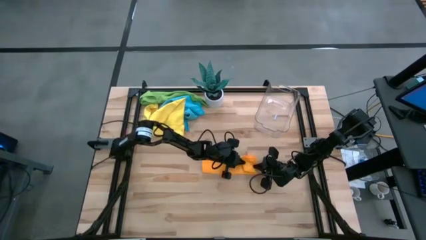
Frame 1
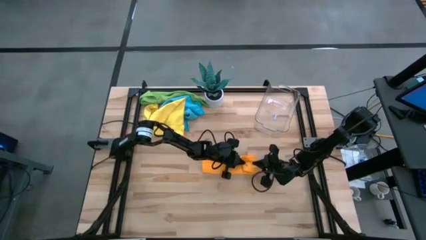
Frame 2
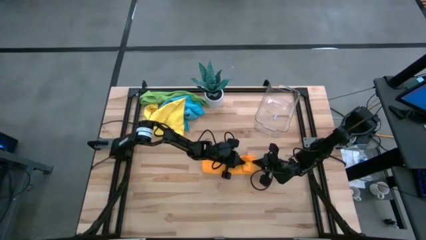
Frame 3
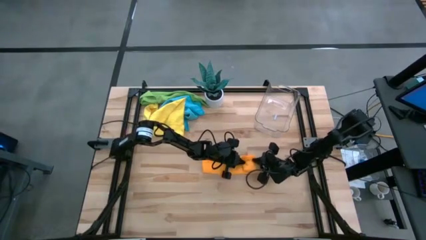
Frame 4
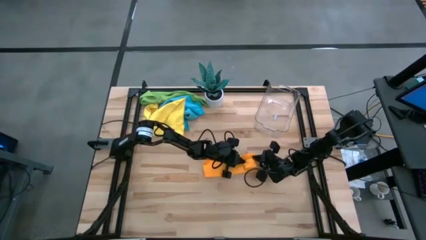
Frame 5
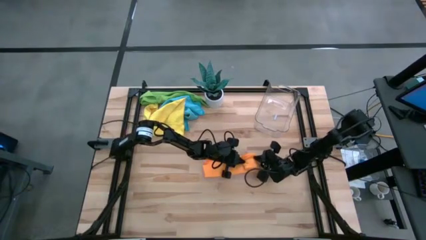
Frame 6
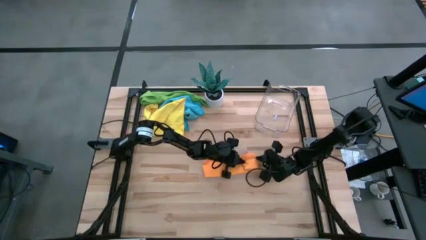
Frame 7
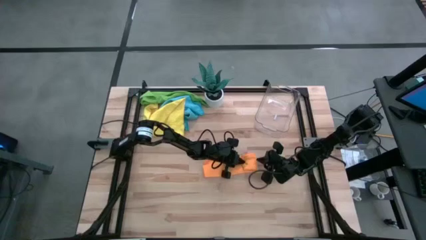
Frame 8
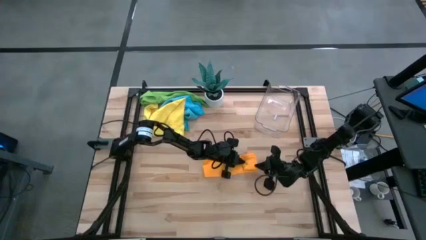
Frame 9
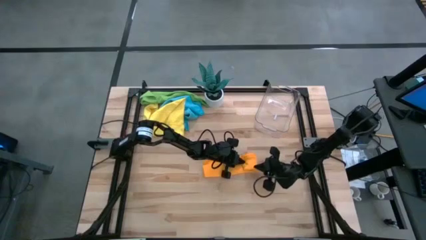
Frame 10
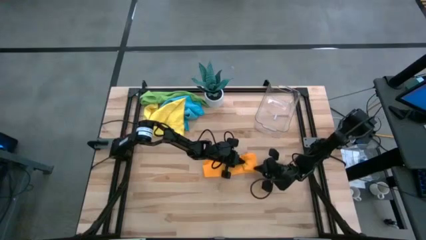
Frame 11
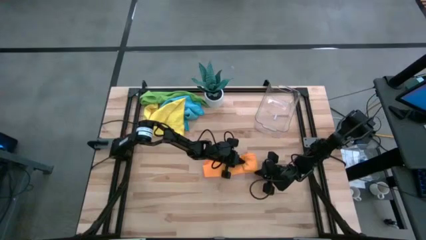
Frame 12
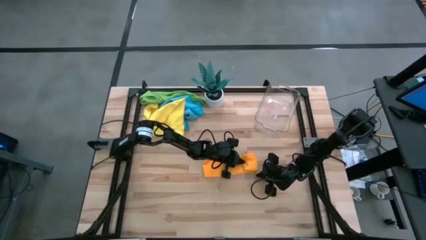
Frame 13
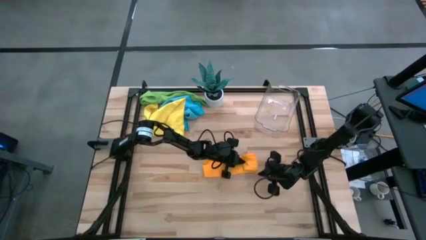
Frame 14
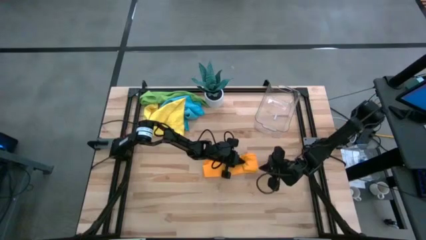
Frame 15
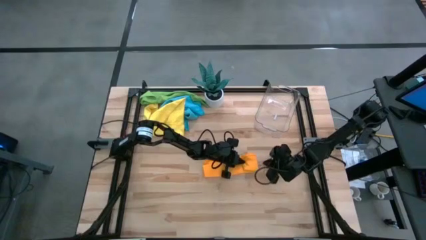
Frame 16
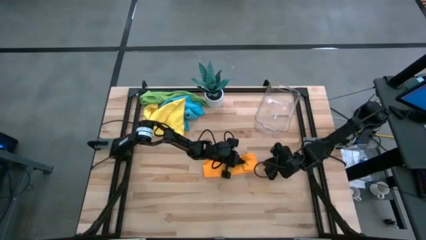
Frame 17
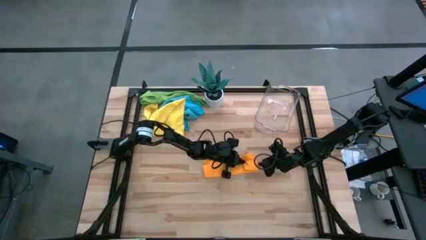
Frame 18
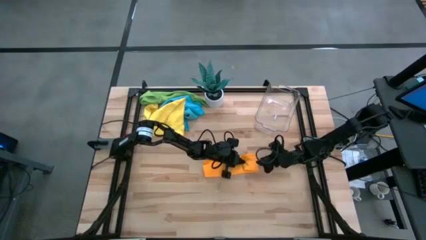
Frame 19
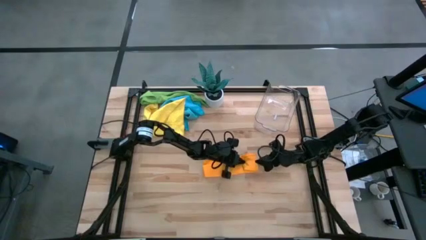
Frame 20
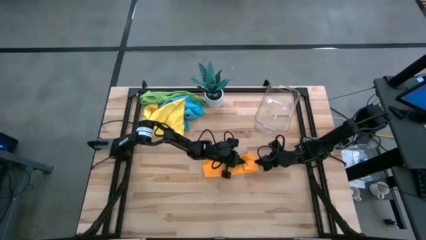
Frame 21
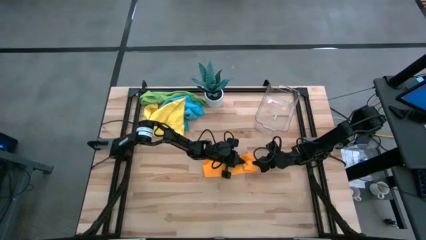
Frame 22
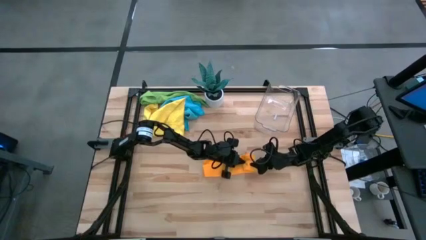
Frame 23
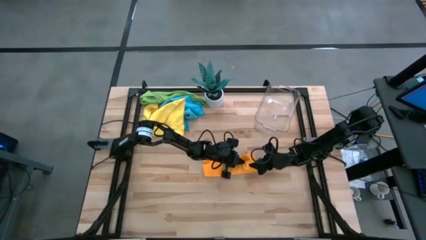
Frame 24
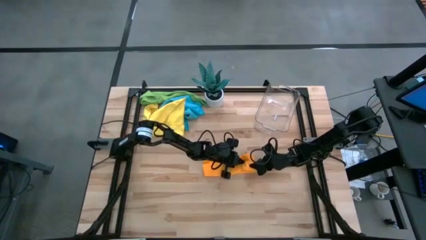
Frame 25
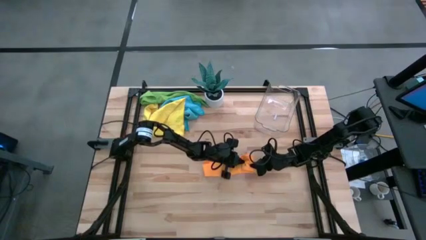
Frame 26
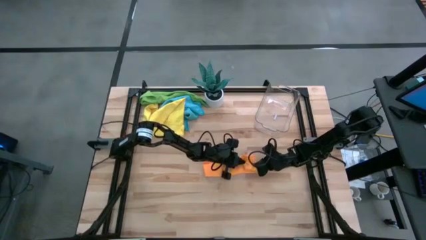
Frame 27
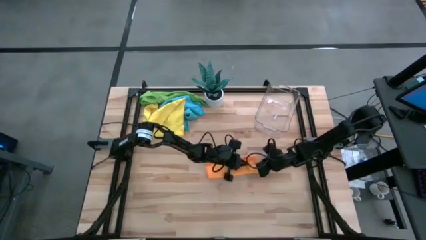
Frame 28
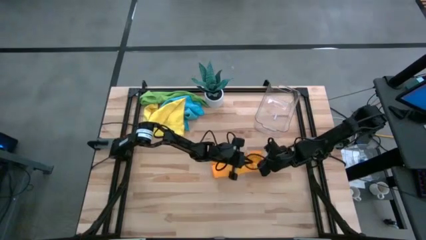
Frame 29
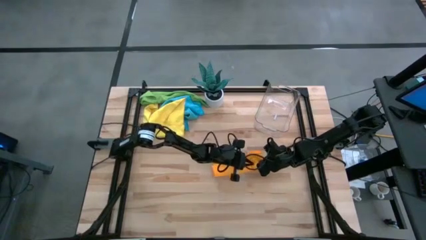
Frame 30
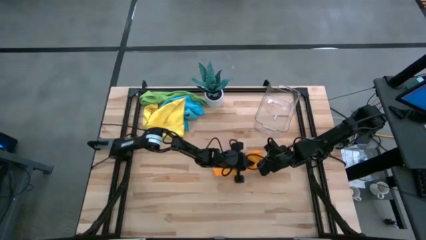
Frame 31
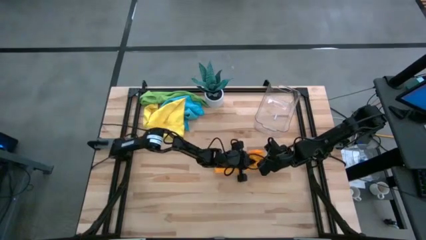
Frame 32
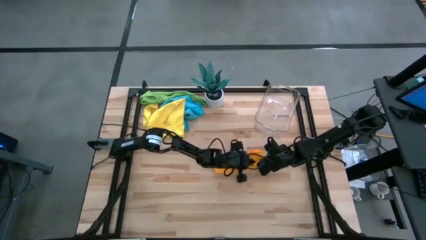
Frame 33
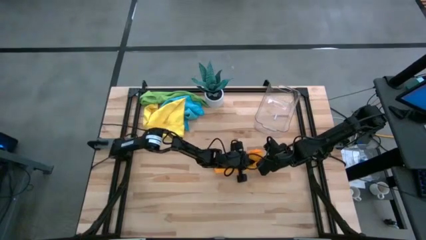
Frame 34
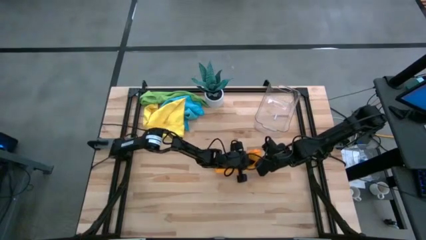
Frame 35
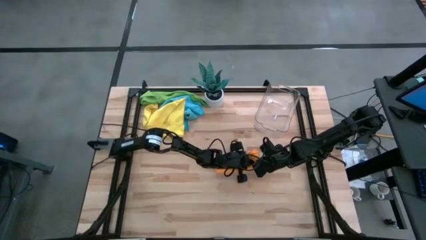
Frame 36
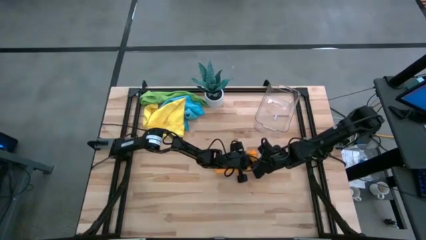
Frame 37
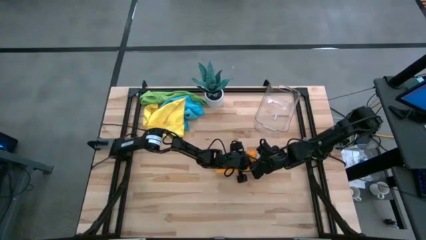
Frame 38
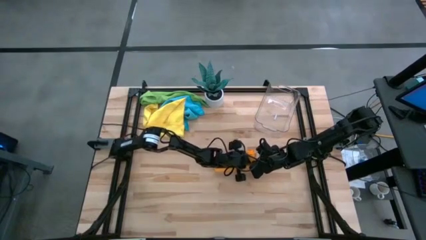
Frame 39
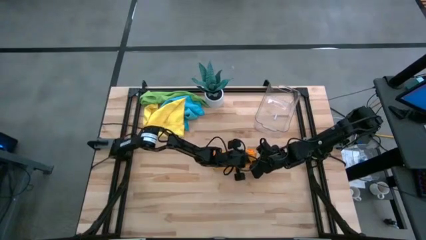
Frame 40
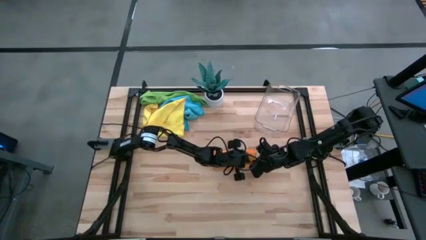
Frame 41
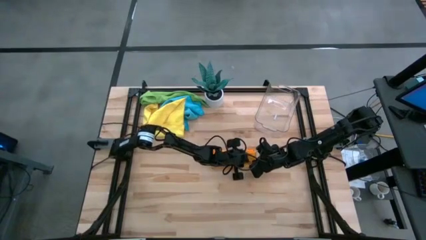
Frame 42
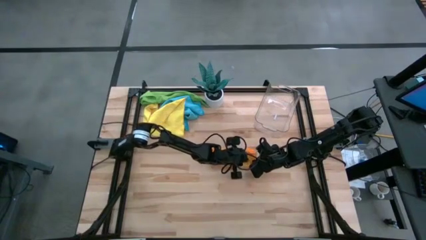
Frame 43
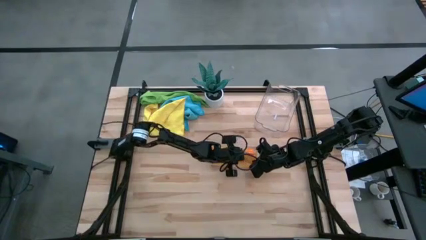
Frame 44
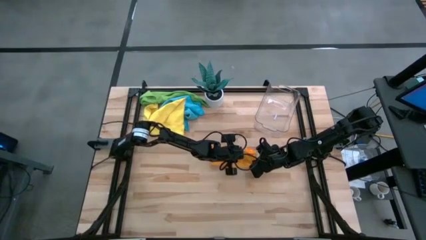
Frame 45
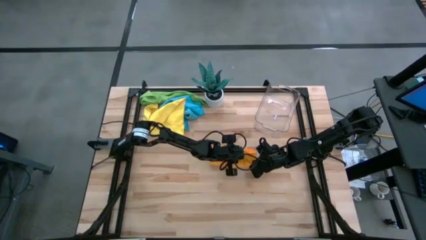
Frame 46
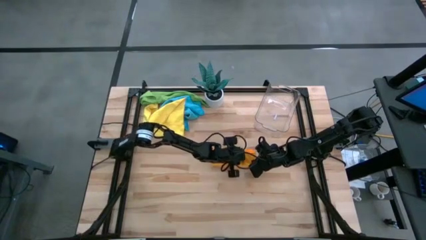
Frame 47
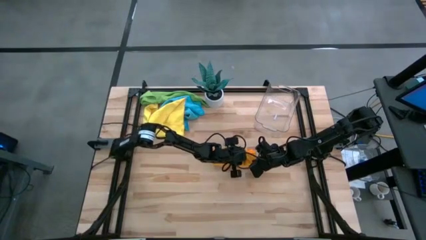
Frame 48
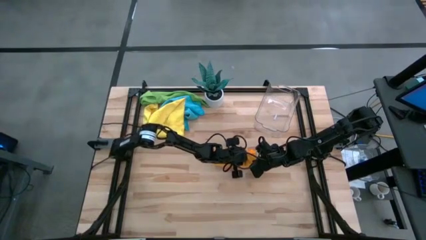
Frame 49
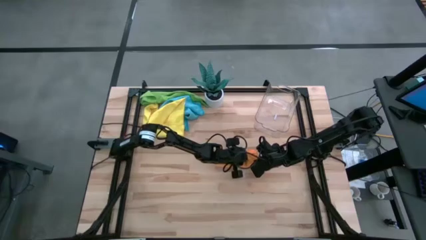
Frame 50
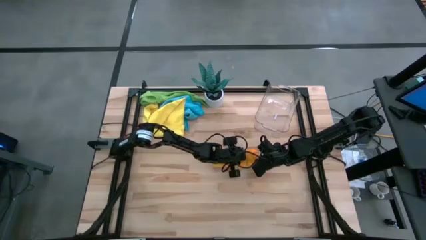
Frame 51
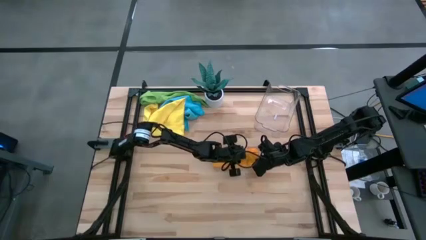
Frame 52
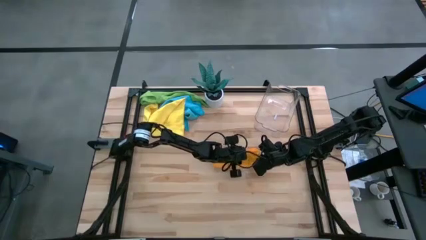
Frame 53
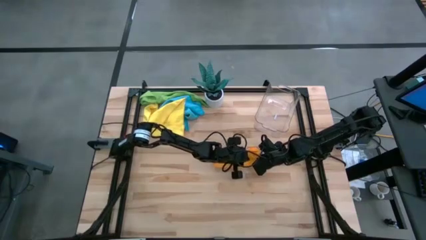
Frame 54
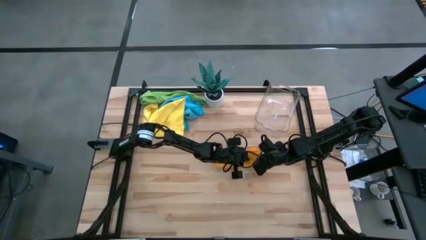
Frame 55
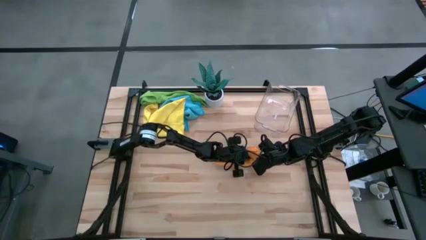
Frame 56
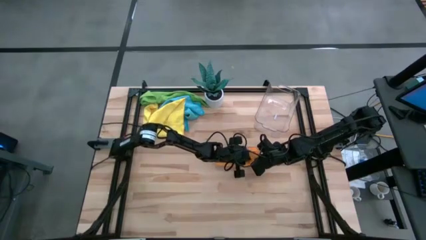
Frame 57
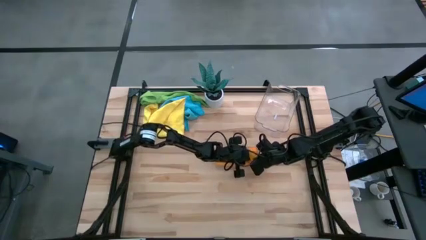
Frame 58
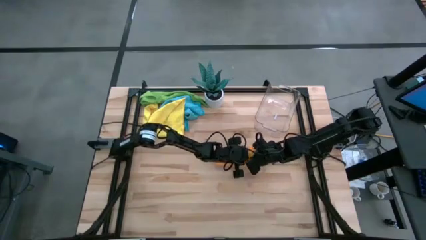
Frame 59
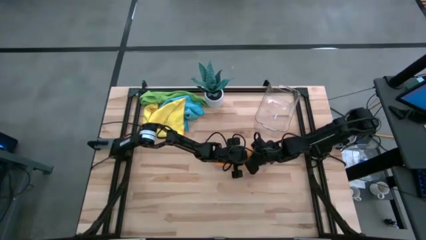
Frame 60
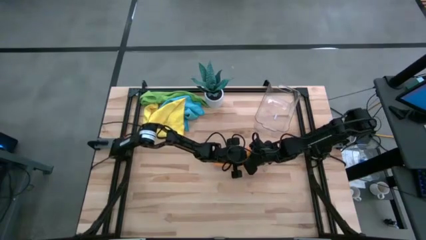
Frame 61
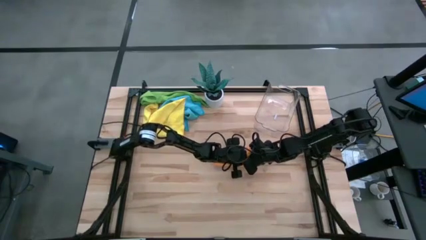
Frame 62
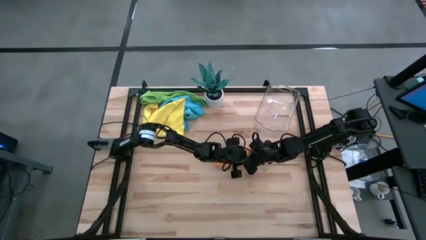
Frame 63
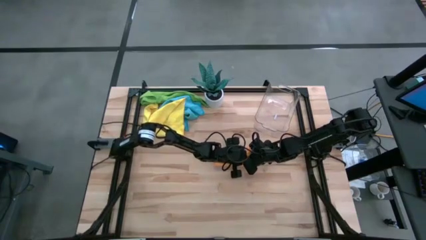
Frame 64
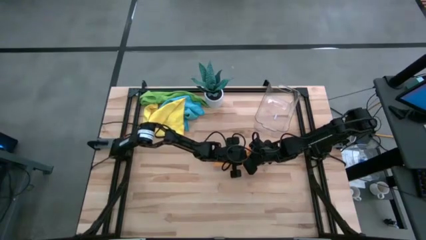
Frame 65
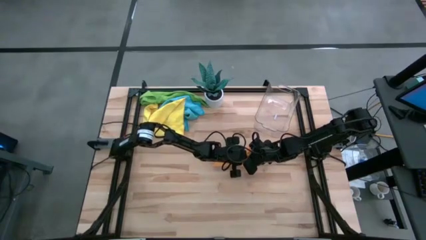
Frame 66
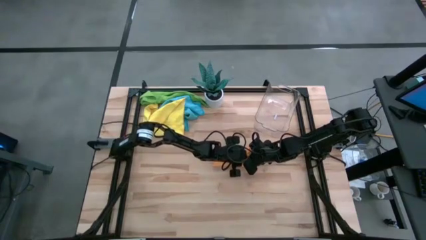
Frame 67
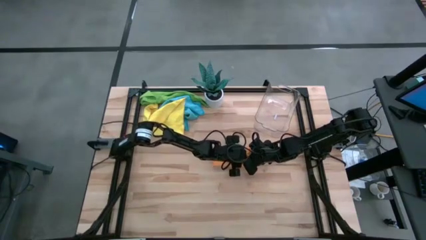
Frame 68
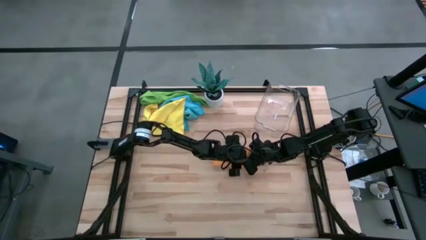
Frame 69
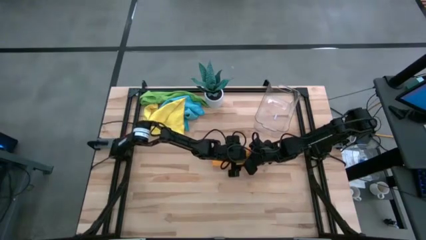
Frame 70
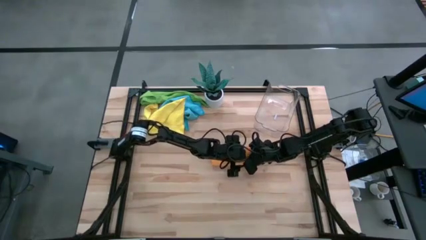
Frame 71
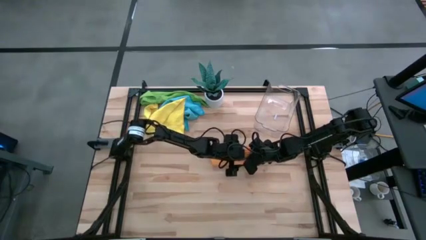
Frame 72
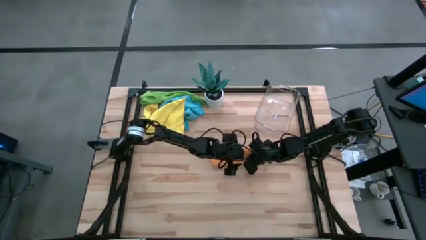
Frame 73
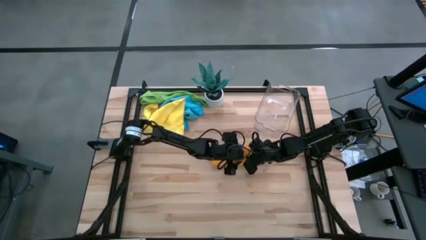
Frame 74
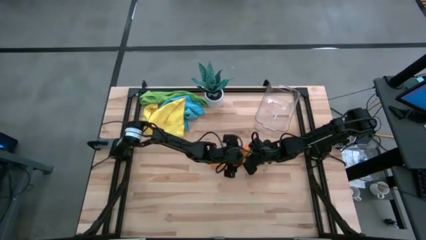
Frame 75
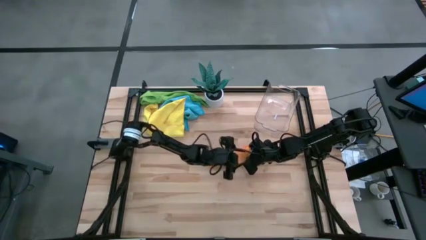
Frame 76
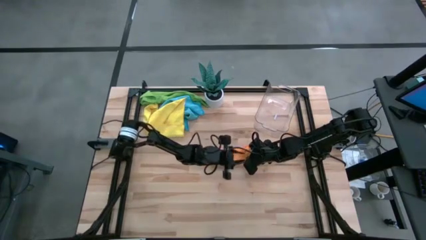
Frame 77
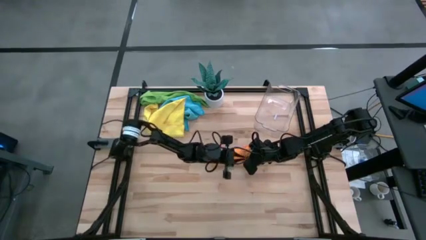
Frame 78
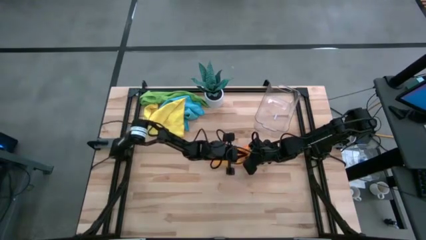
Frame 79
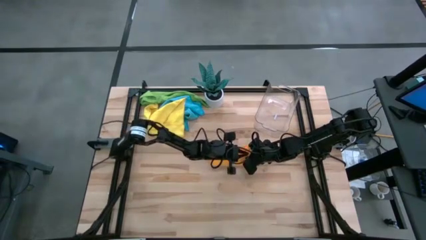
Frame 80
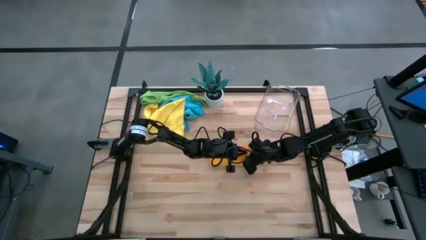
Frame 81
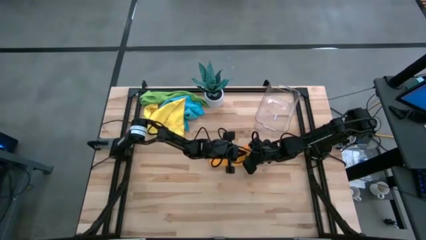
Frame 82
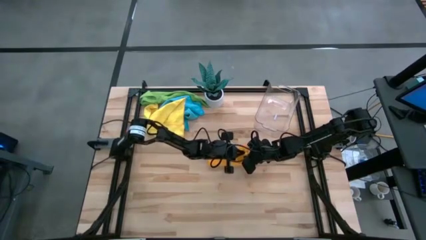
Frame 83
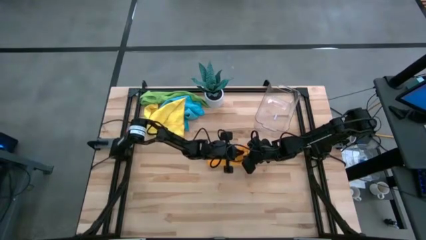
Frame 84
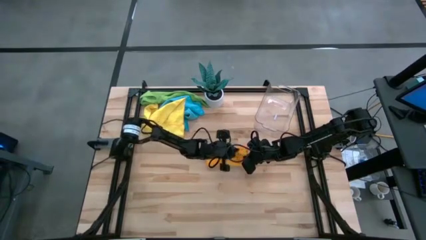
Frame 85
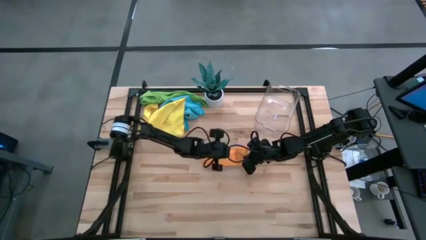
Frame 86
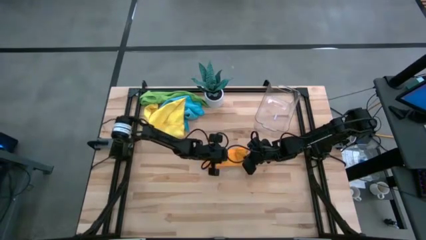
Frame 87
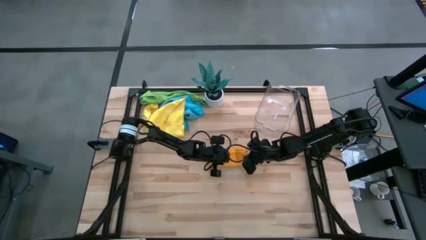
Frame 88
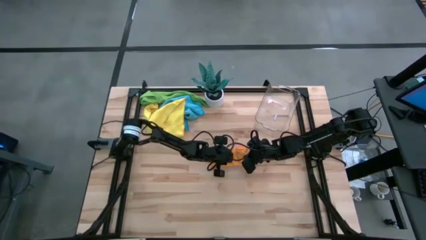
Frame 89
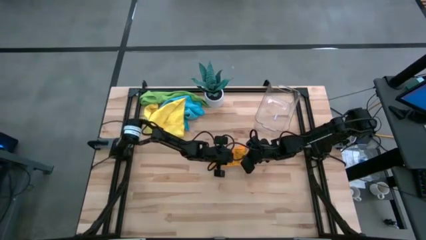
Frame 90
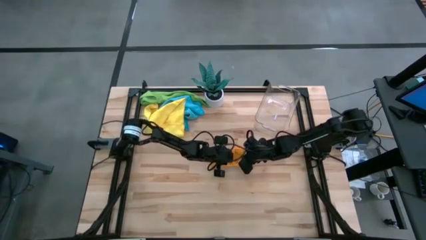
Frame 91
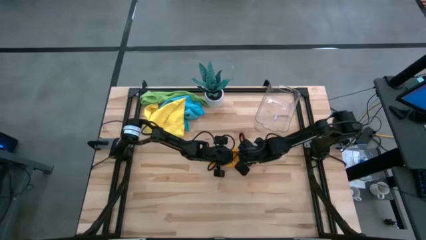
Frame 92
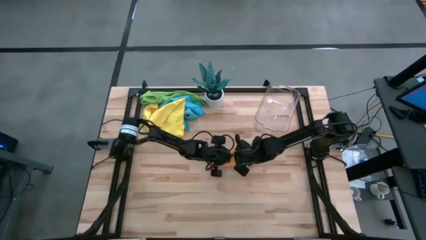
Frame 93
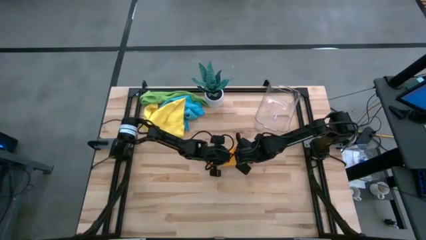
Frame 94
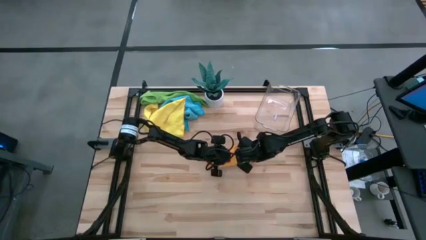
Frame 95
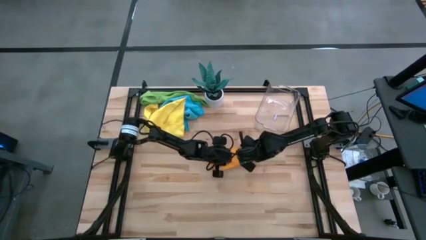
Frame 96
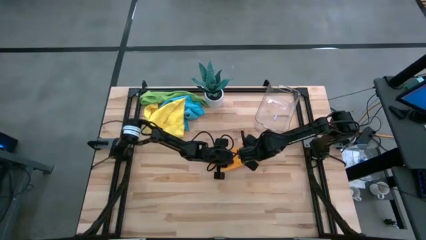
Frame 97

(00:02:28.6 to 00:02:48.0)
Task: Roll microfiber towels into tight, uniform cylinder then place into a basket
Roll the orange microfiber cloth
